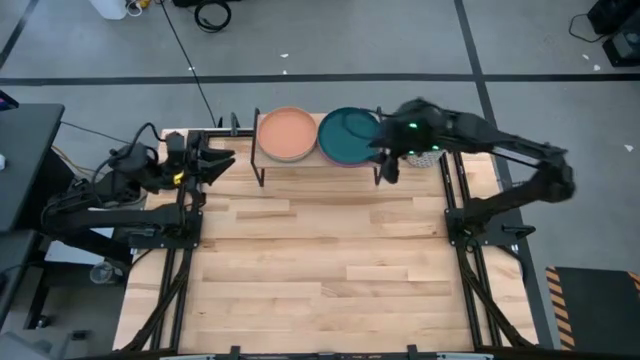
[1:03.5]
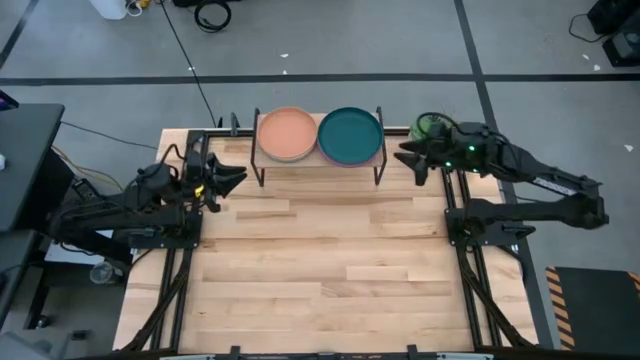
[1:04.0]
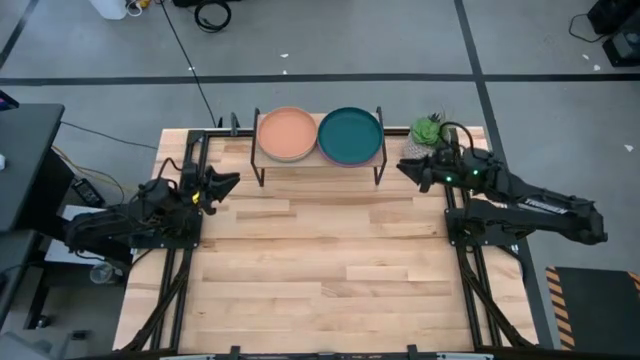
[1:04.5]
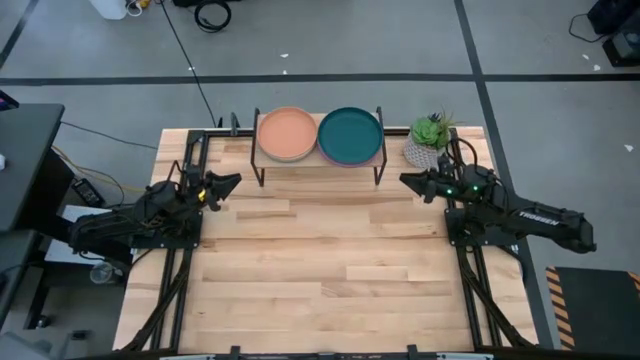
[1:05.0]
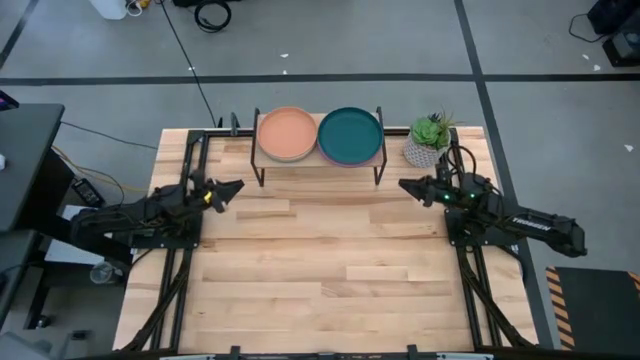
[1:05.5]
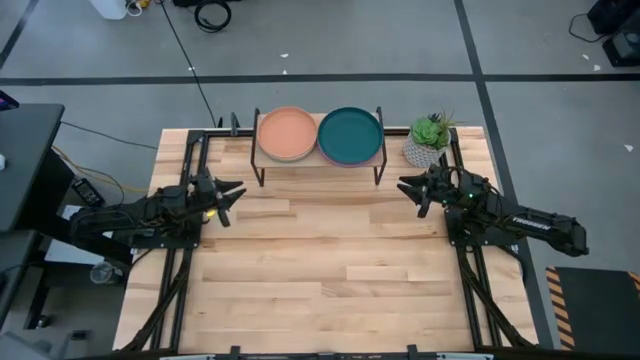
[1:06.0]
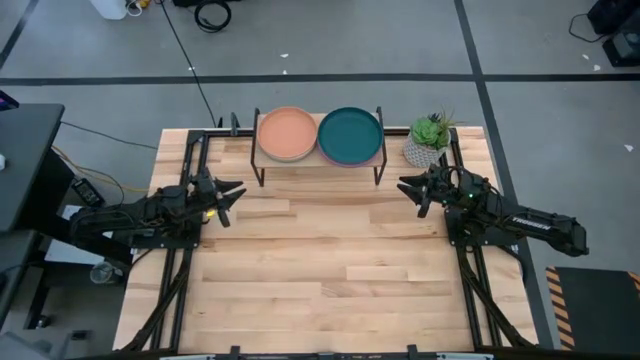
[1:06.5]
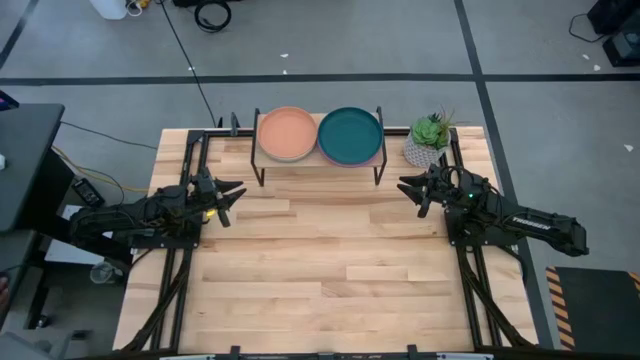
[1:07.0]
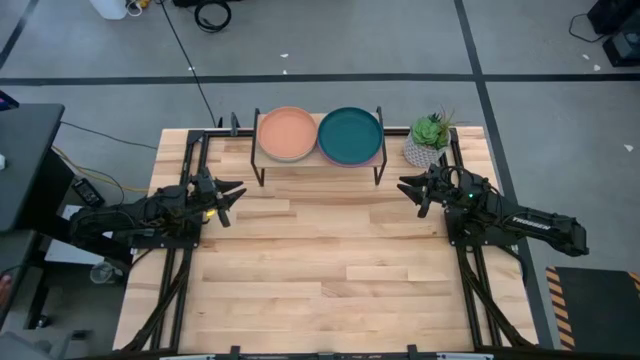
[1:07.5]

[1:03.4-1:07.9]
Task: Place and stack plates onto a shelf
Return to Home Position

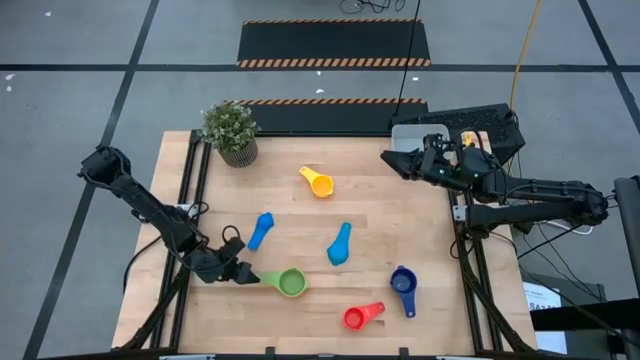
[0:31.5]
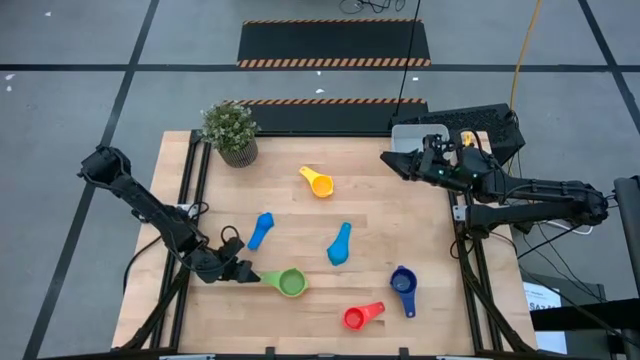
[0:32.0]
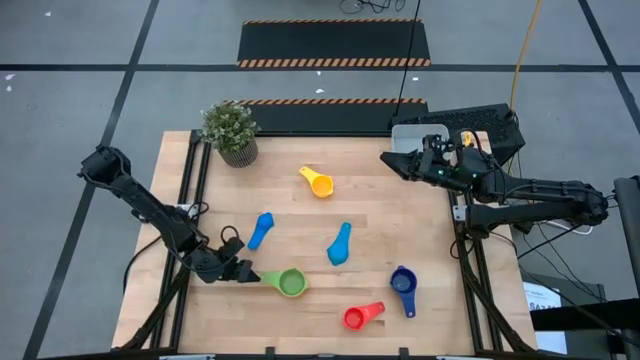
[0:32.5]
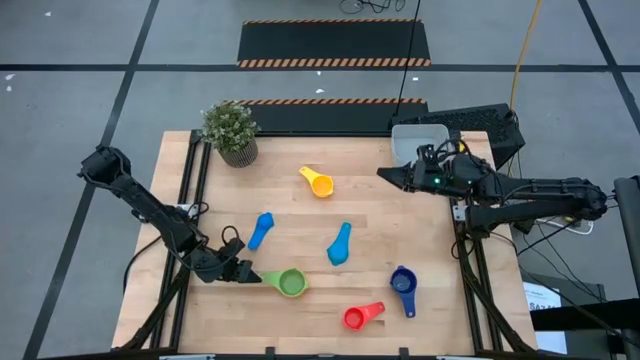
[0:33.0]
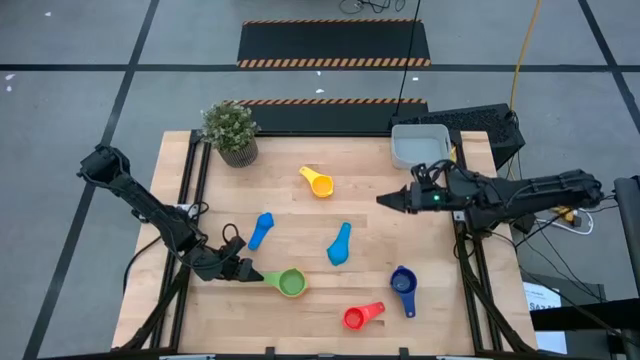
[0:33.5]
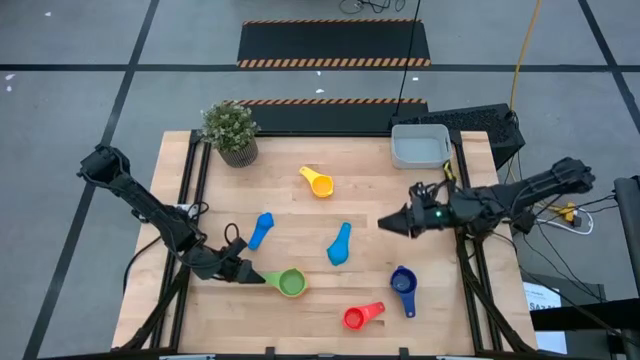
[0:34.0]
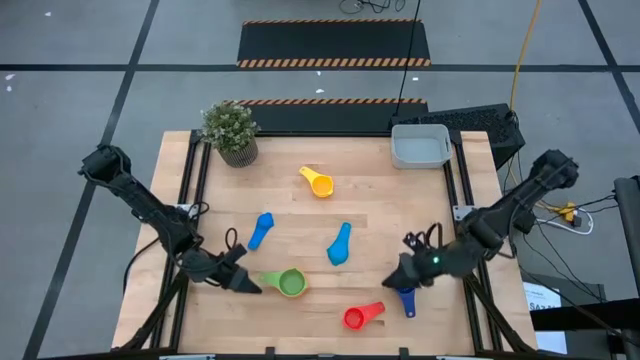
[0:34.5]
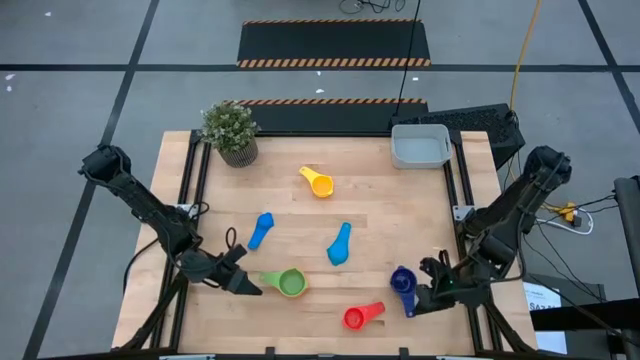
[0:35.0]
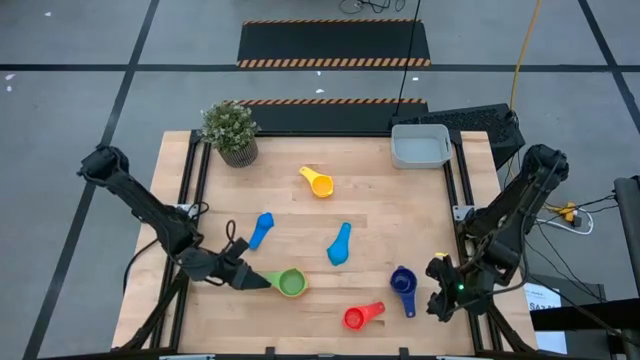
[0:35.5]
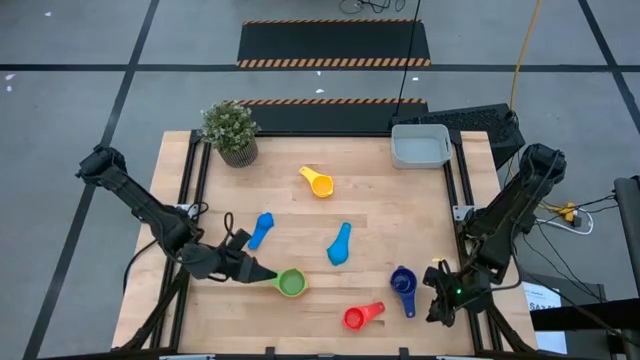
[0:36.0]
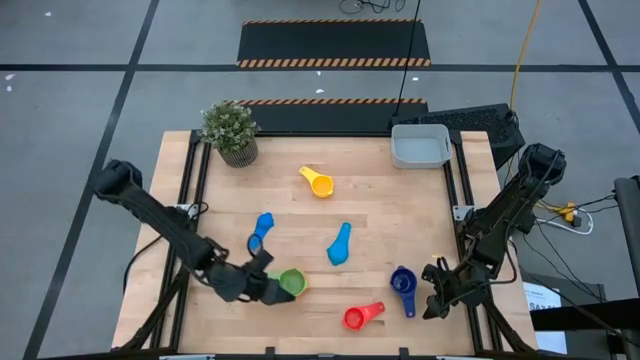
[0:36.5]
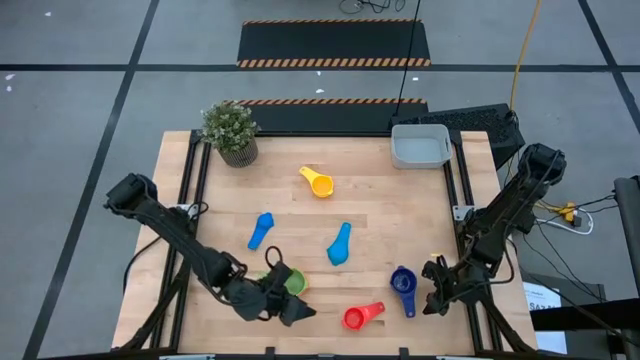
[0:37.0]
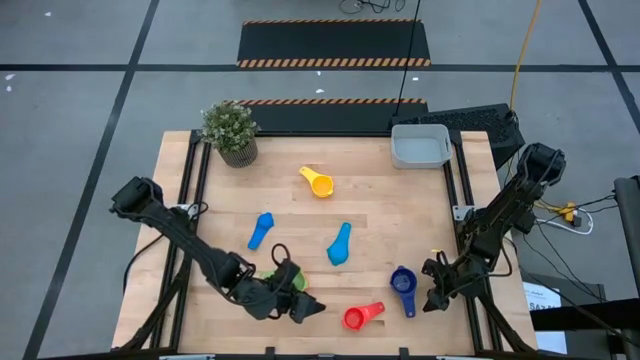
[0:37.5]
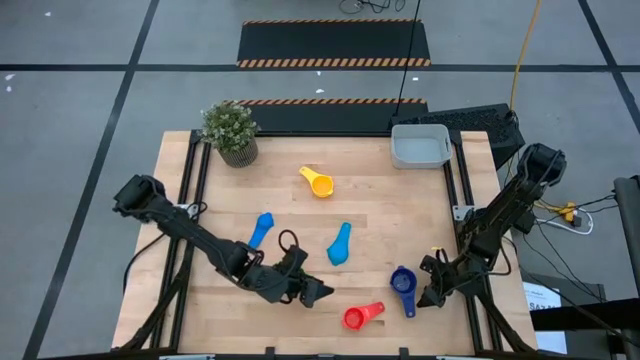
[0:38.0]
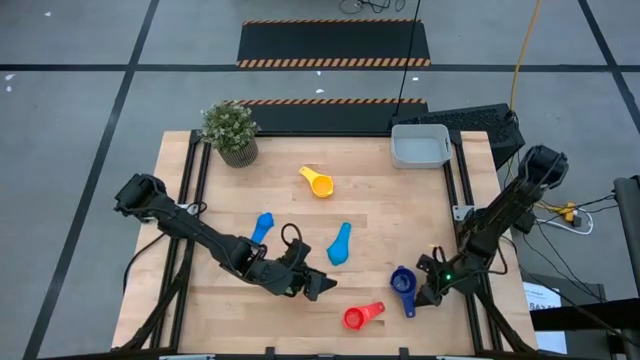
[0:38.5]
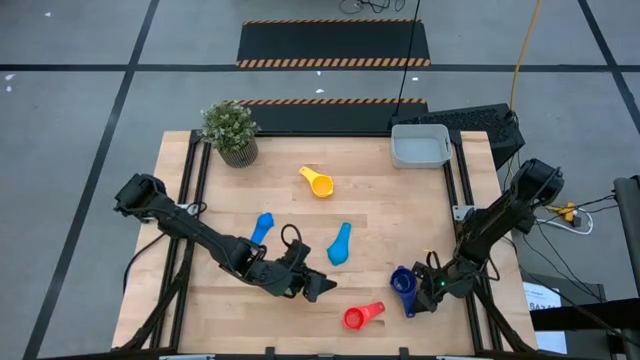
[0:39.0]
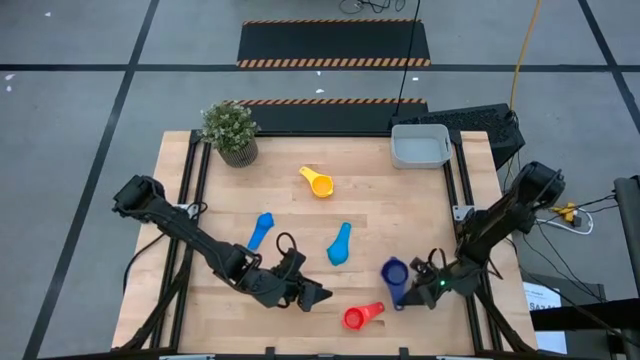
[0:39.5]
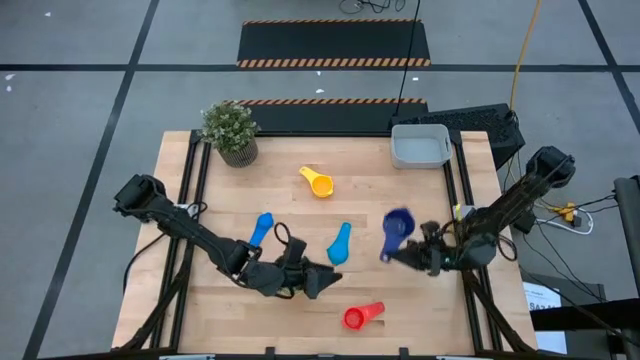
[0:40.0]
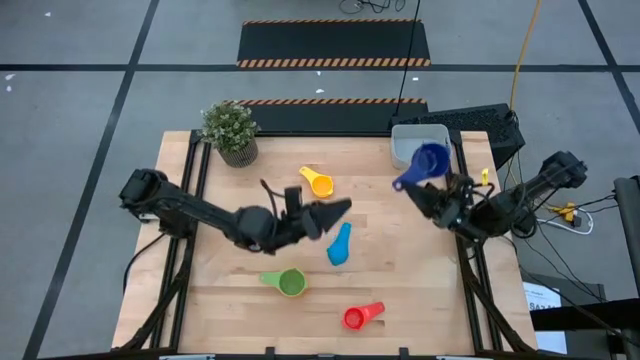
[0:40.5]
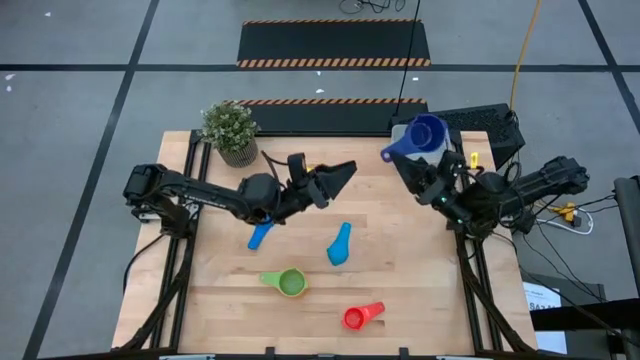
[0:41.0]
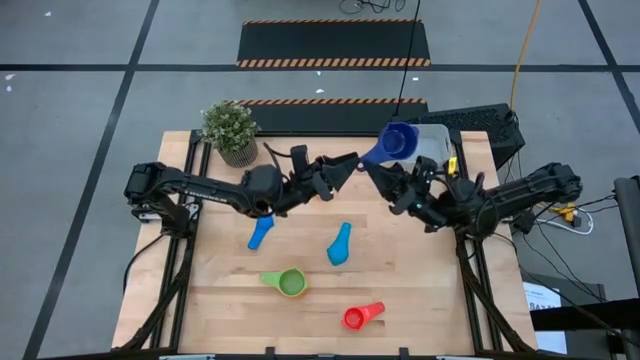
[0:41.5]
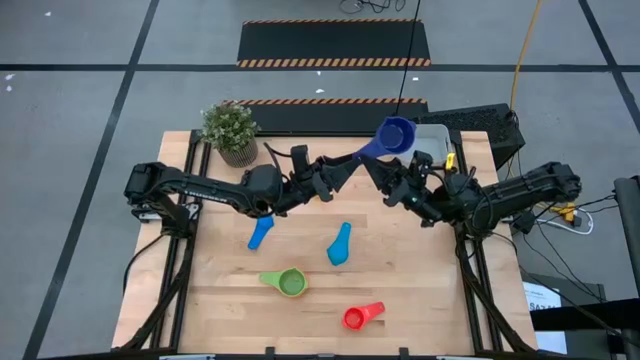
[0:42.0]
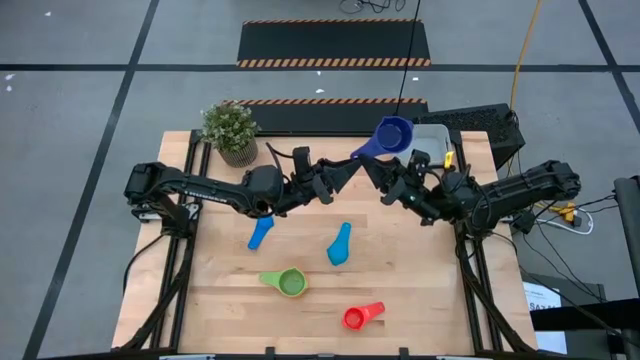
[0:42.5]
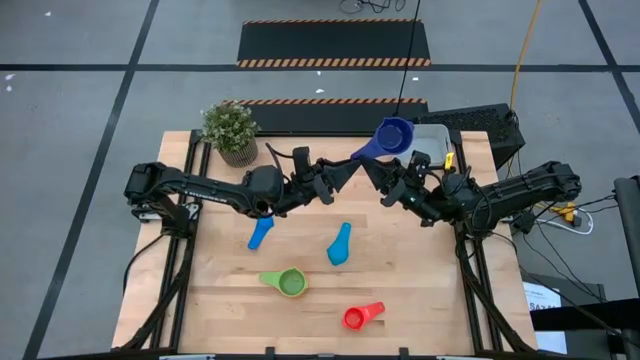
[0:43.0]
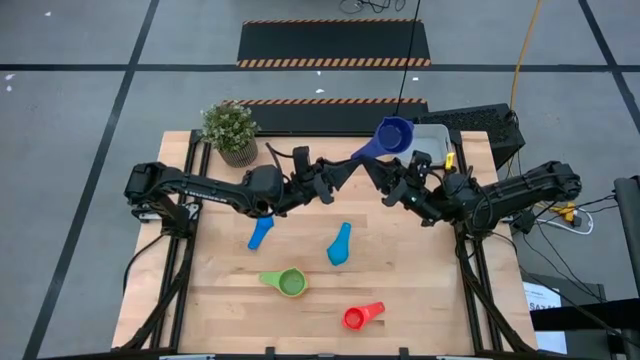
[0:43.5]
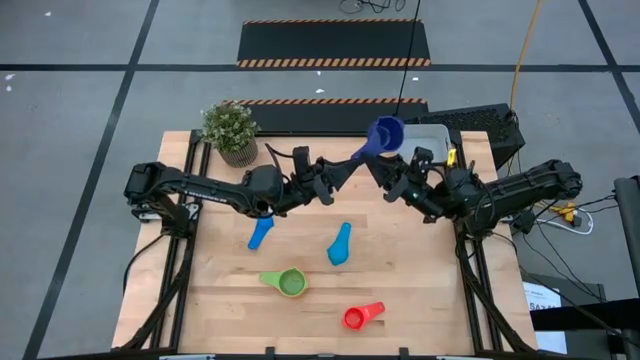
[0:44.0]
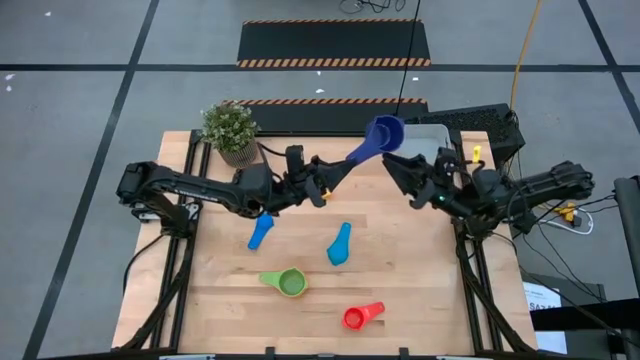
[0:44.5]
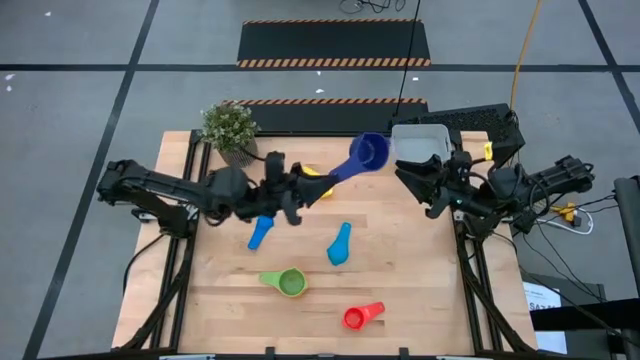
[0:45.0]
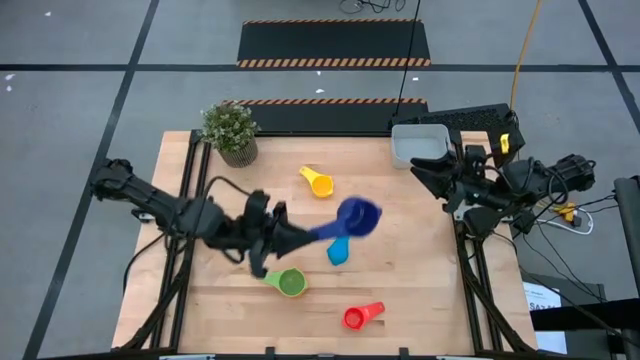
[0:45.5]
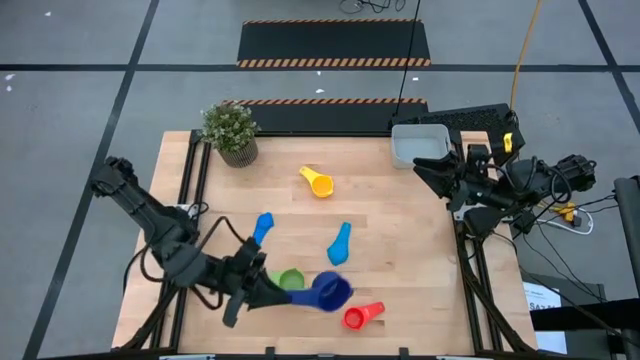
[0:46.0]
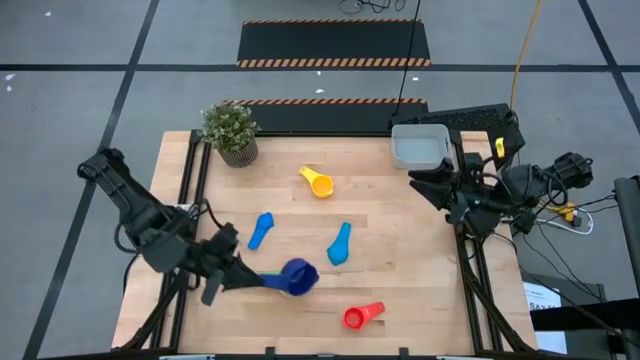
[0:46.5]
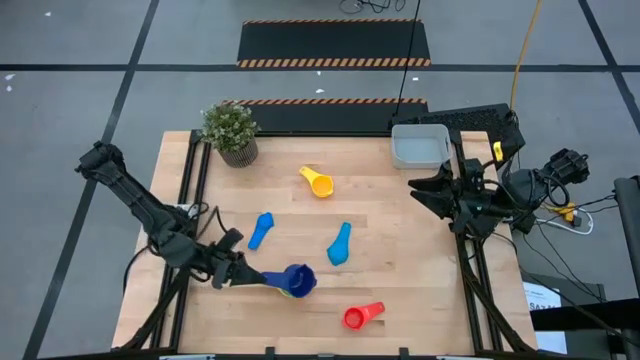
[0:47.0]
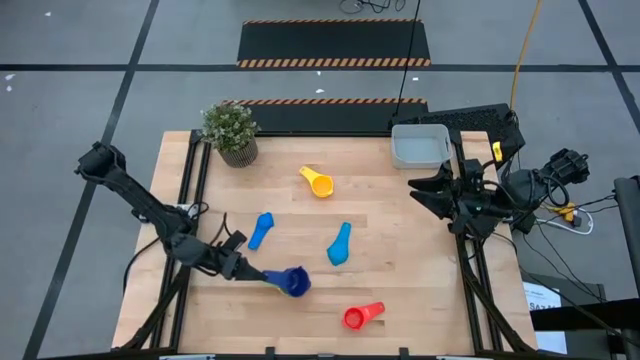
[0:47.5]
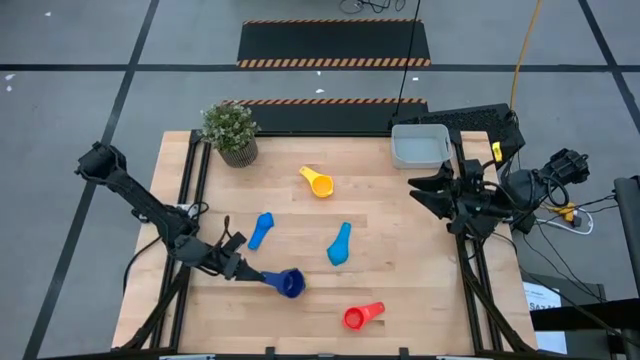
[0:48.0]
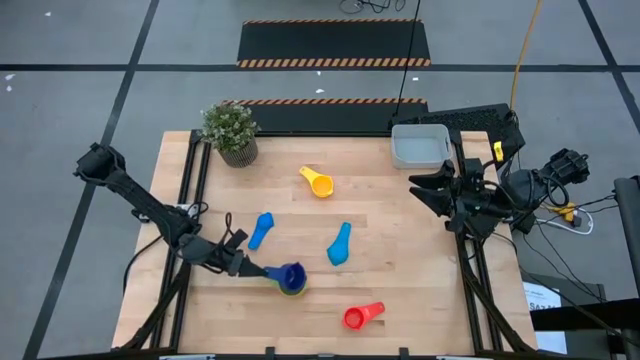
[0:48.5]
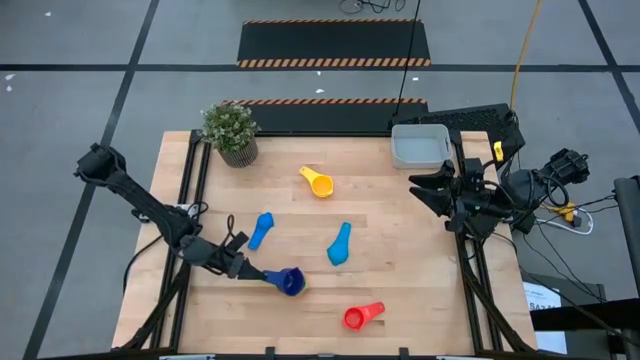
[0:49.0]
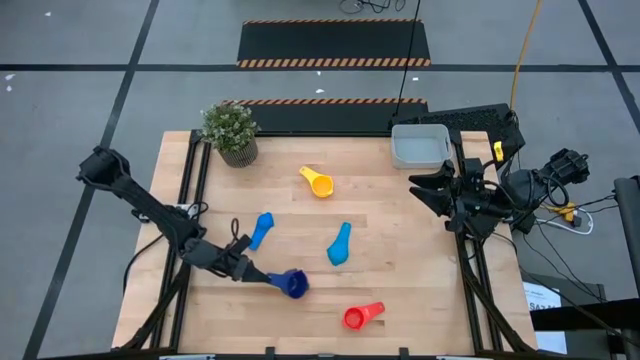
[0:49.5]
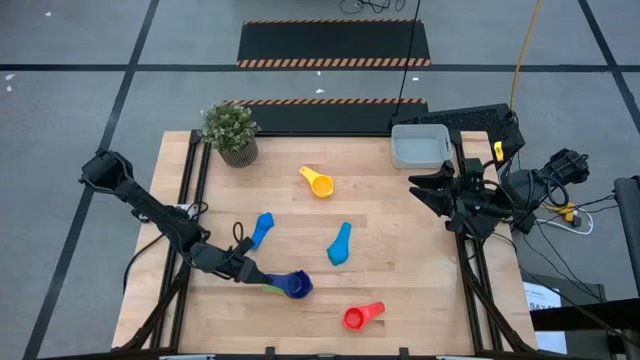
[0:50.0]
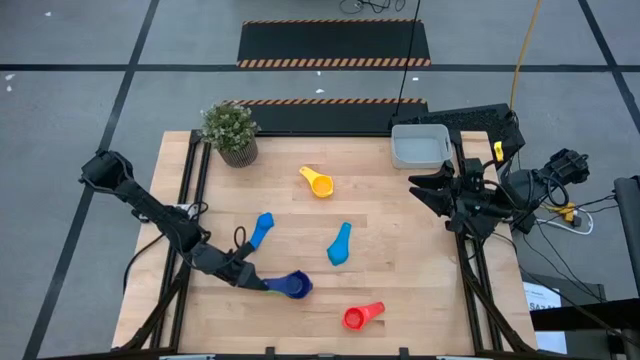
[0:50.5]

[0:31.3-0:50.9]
Task: Nest measuring cups in basket
Stack the dark blue measuring cup on the green measuring cup
